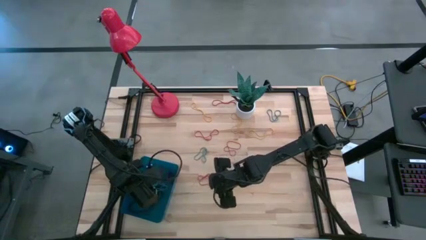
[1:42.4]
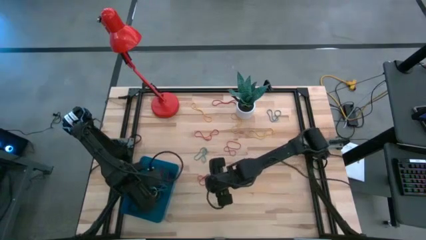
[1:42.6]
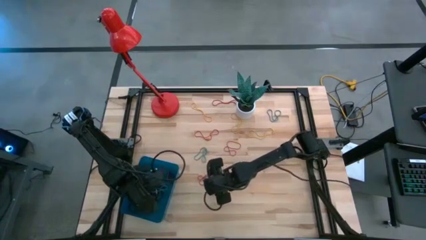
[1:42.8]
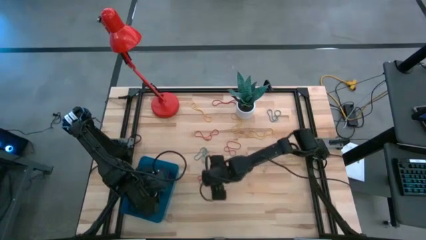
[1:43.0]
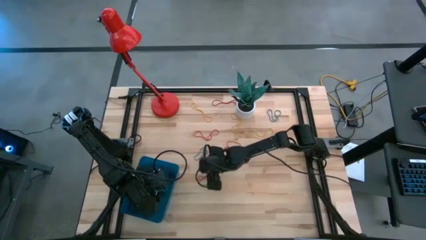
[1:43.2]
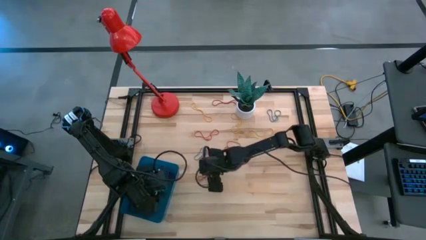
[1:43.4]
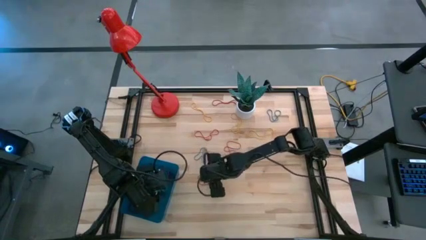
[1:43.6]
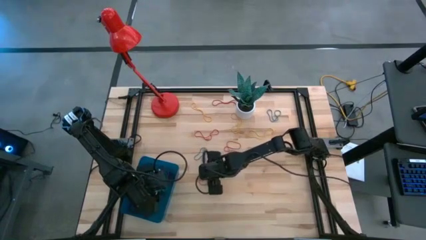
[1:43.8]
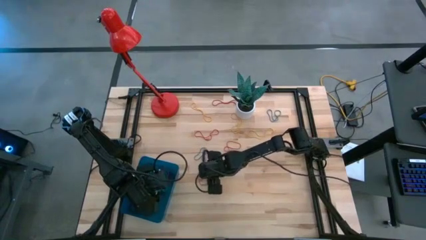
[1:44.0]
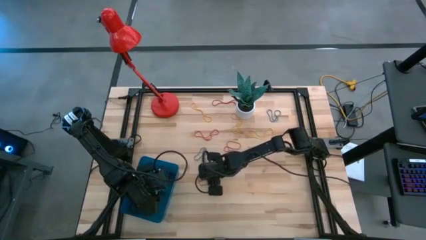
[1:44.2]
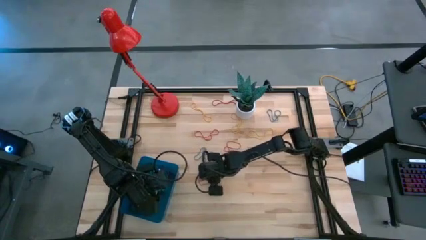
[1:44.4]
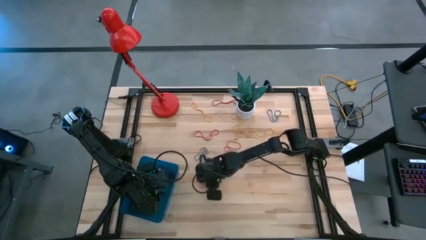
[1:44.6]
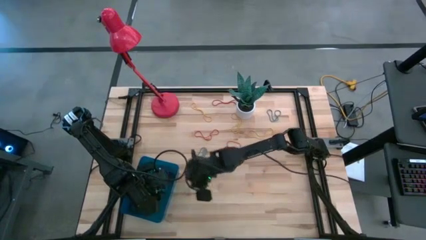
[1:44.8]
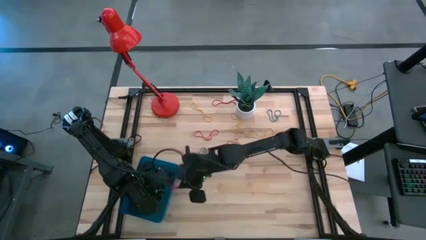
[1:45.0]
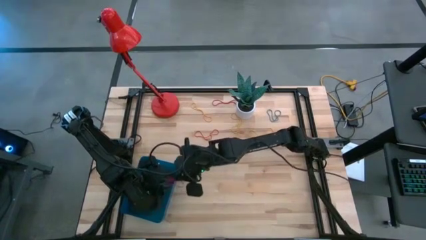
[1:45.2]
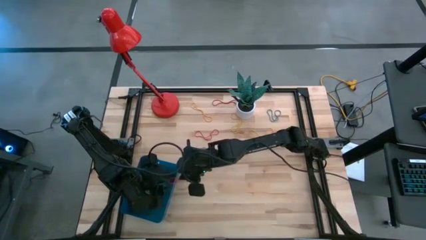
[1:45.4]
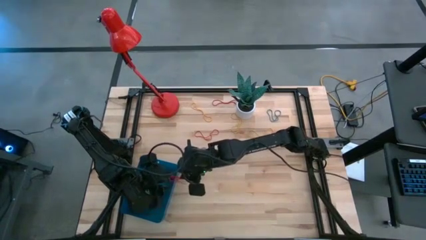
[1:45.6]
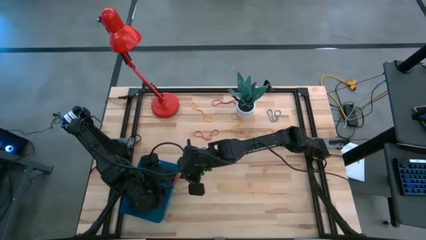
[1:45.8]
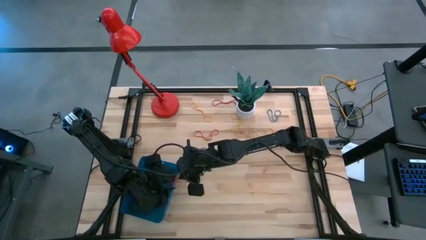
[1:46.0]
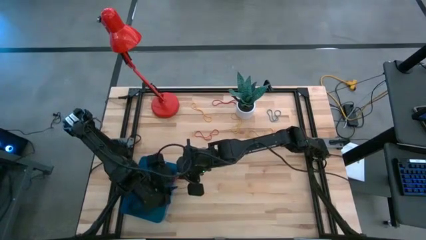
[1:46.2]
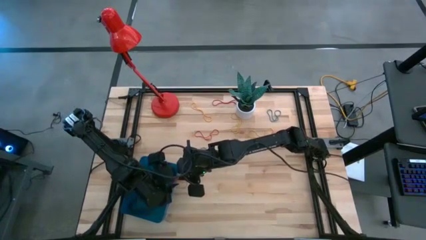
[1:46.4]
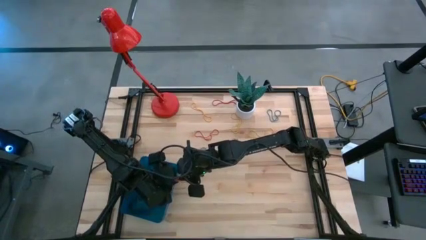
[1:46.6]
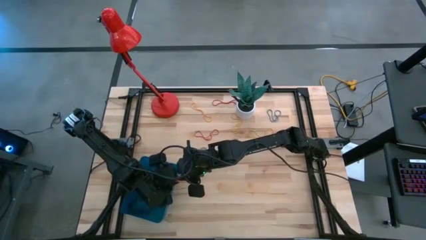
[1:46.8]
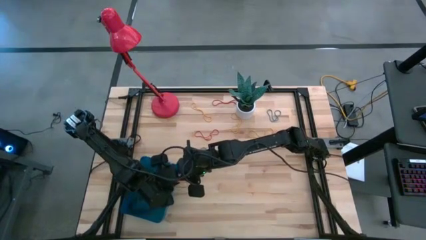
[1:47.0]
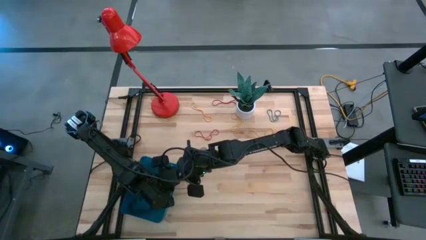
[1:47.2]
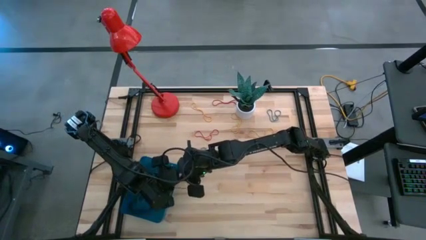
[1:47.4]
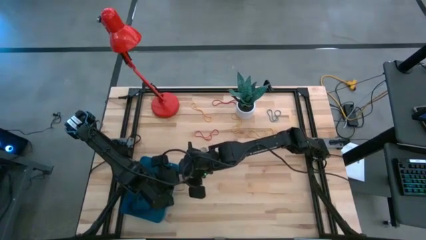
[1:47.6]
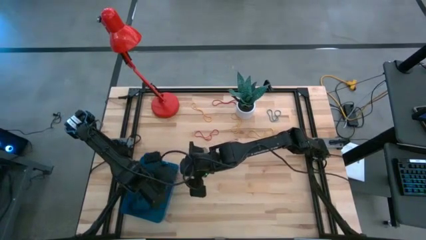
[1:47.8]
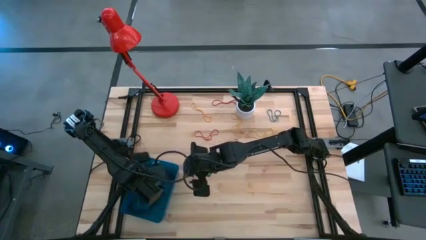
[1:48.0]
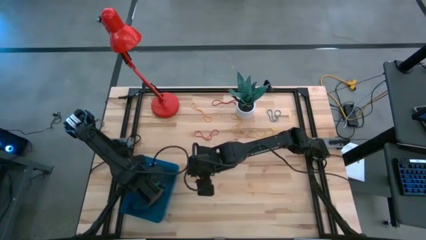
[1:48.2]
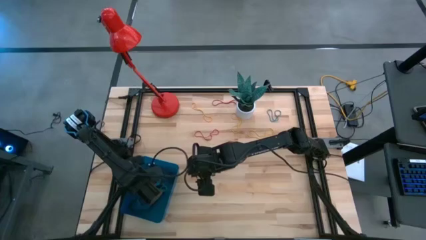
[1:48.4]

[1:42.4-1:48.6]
Task: Pick and place rubber bands into bin
Put the red rubber band into the blue bin

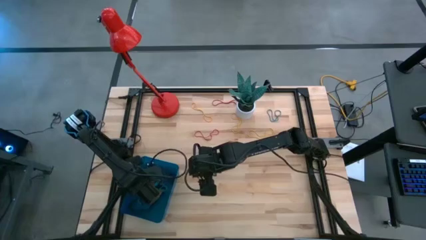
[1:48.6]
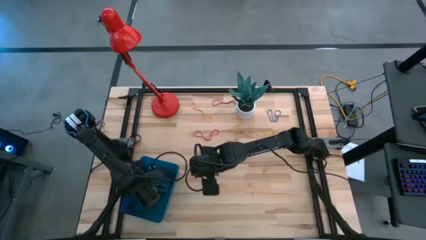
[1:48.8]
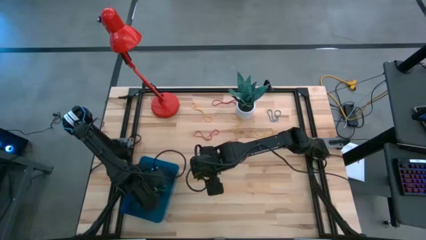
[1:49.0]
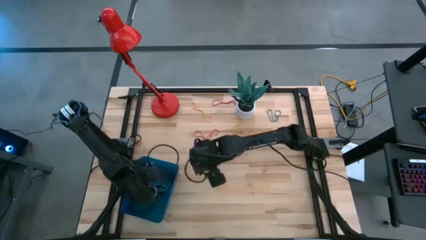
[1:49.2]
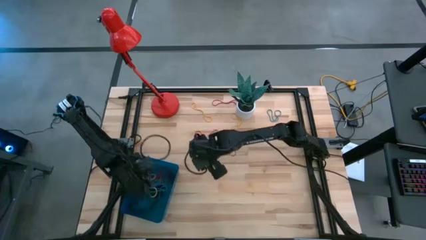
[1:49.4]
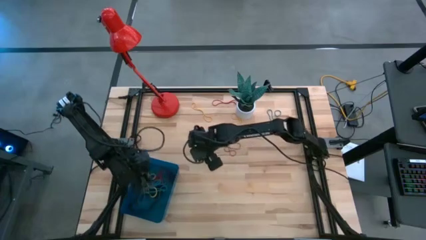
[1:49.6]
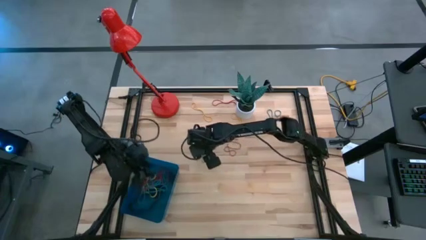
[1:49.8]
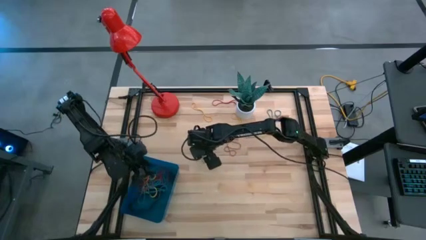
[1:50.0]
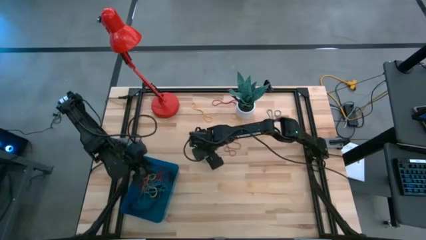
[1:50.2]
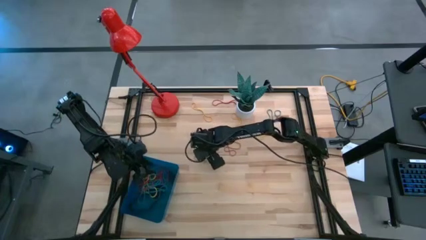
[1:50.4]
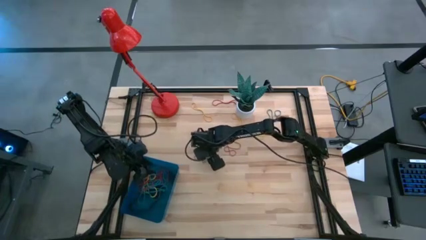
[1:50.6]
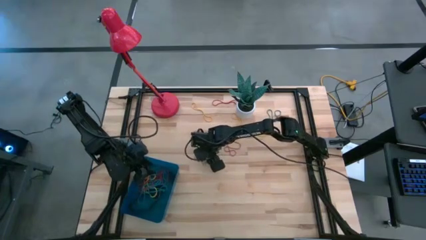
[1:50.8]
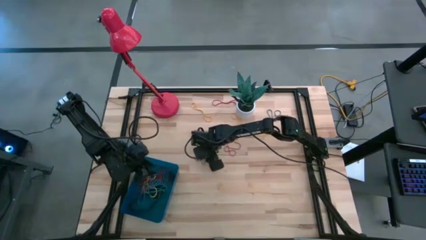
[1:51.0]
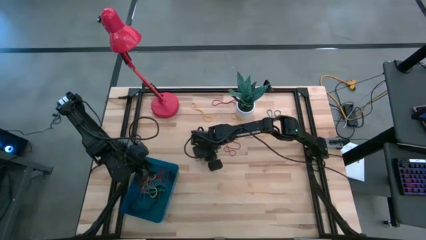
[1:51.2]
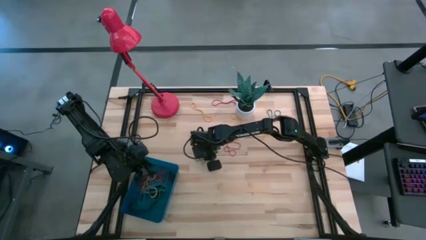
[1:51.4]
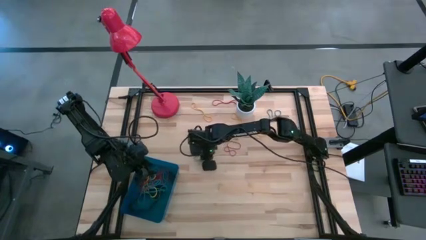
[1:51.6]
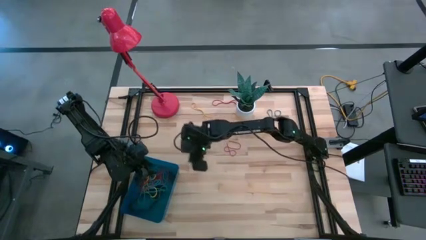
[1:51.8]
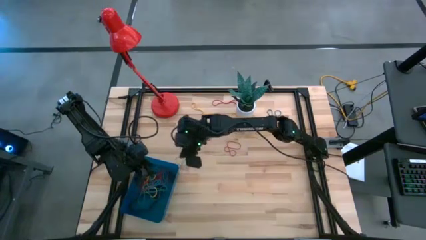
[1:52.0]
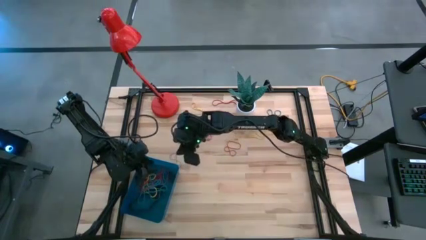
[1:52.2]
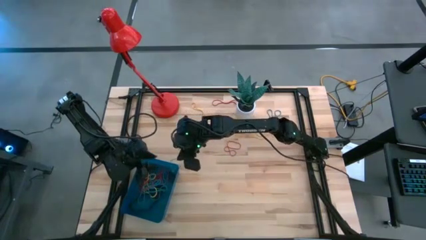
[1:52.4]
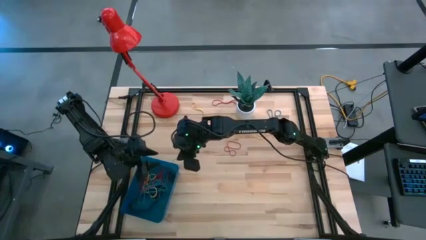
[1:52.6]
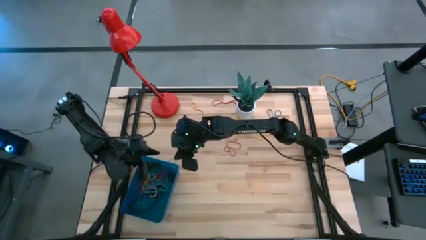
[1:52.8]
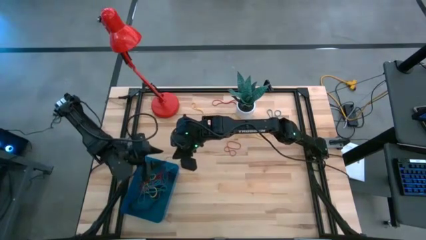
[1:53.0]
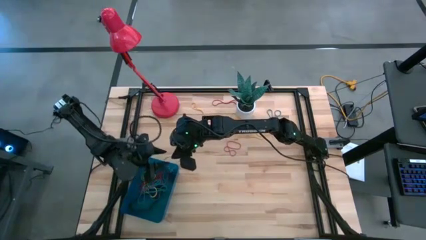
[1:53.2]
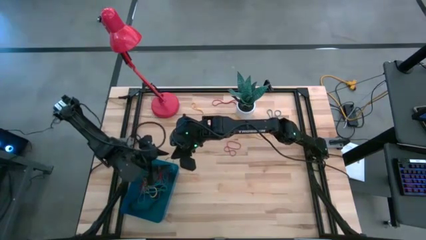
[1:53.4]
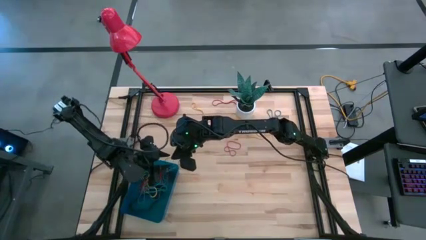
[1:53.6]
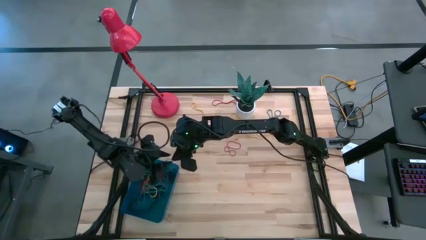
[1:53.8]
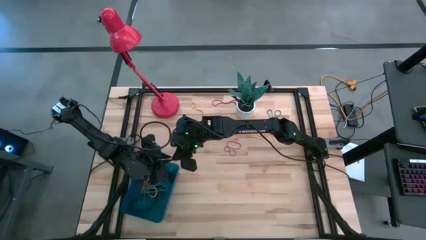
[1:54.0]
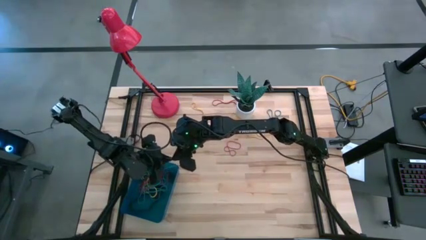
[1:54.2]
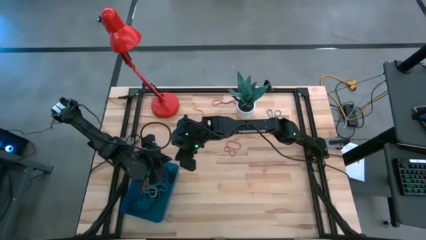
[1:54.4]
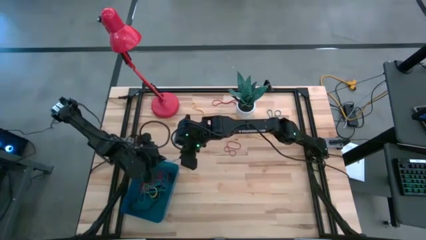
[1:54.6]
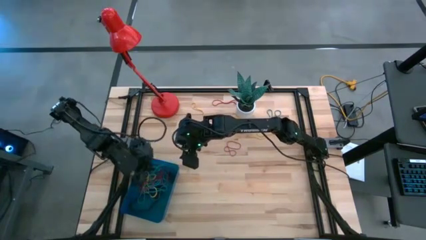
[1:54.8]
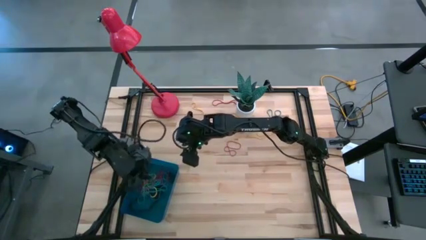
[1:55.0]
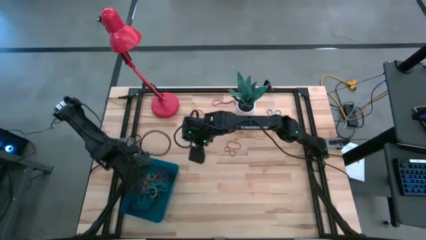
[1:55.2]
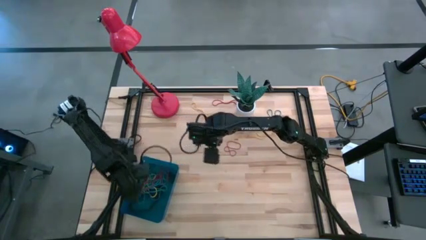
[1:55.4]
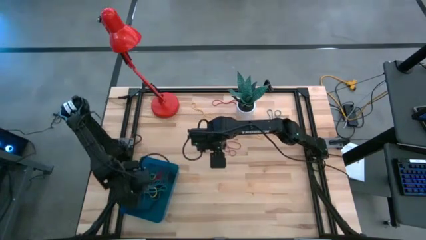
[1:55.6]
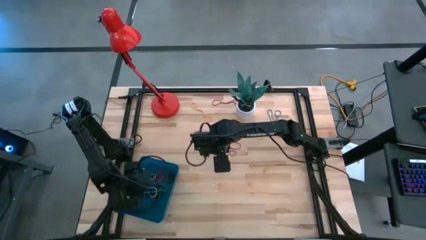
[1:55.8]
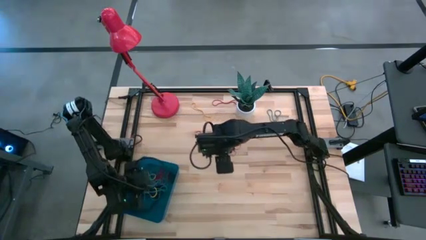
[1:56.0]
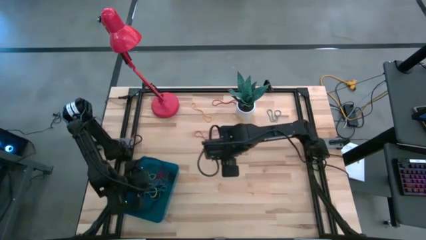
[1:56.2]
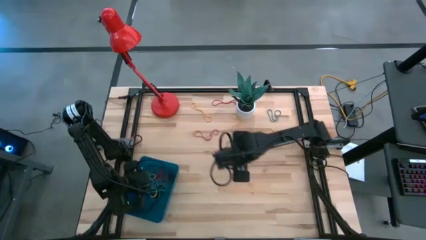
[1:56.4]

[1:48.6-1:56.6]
Put the blue rubber band into the blue bin
